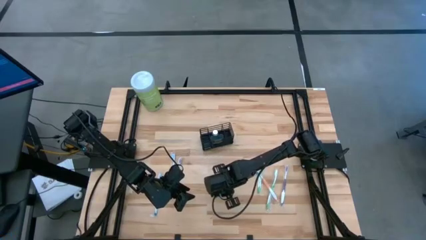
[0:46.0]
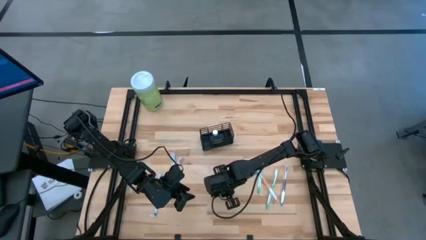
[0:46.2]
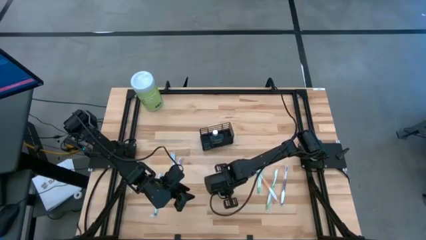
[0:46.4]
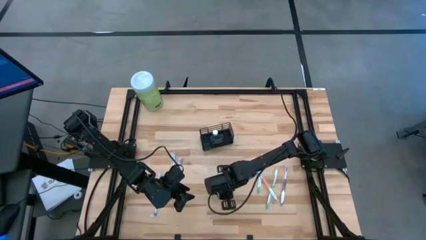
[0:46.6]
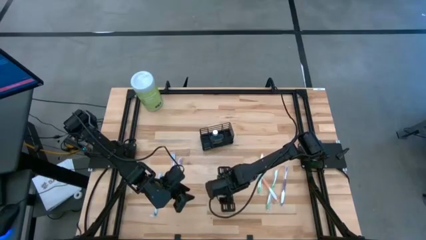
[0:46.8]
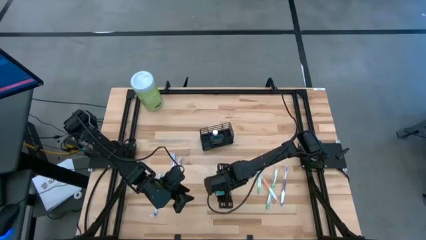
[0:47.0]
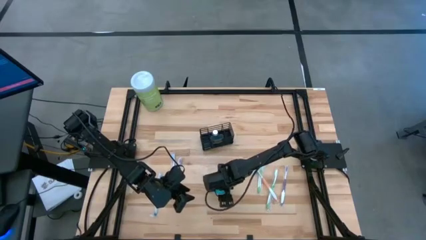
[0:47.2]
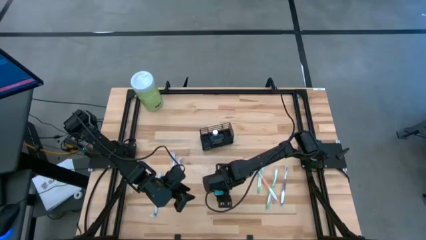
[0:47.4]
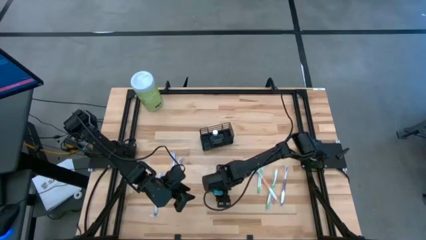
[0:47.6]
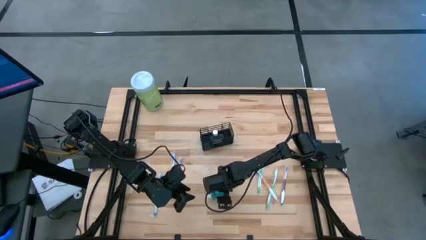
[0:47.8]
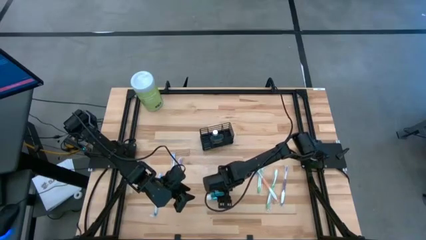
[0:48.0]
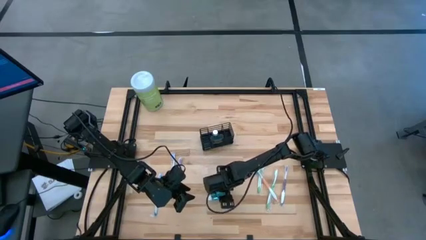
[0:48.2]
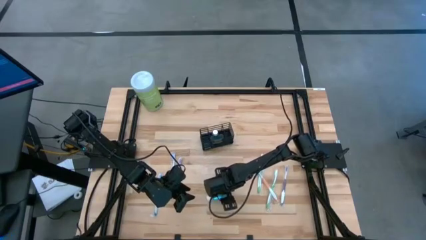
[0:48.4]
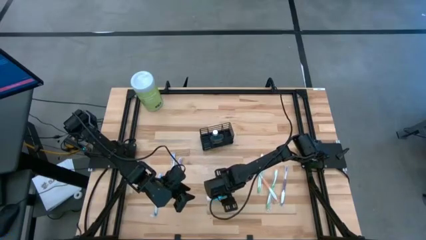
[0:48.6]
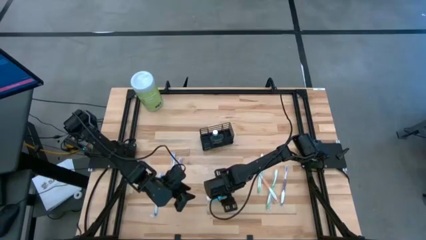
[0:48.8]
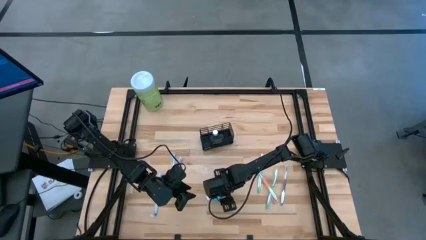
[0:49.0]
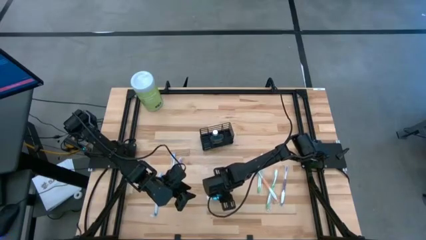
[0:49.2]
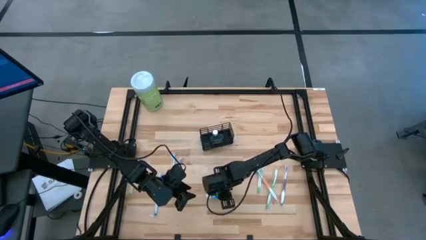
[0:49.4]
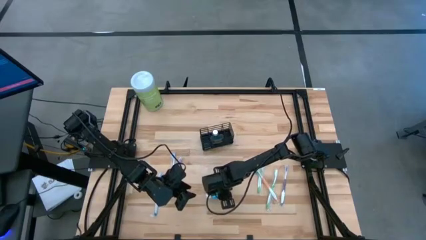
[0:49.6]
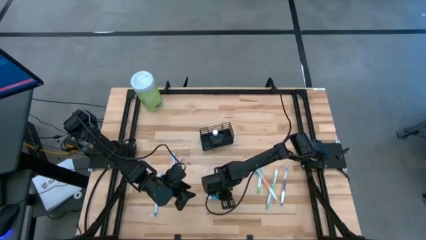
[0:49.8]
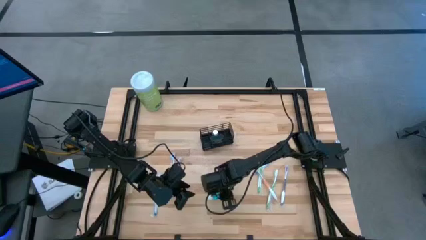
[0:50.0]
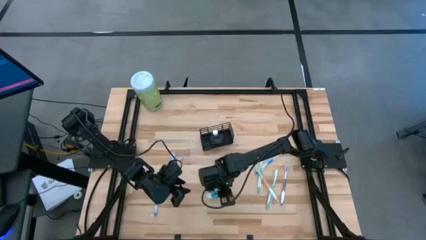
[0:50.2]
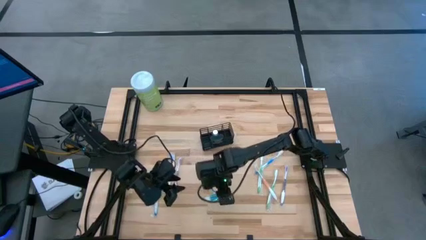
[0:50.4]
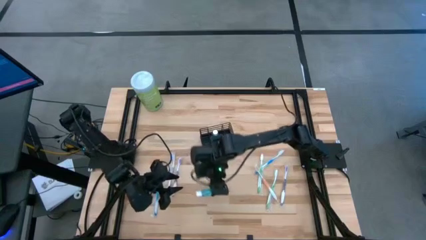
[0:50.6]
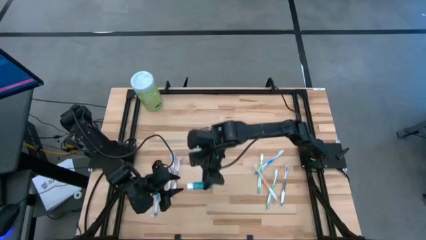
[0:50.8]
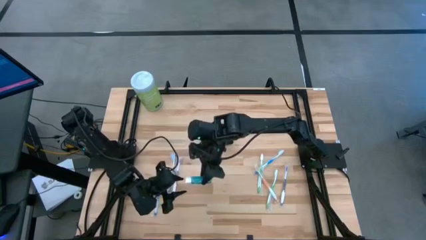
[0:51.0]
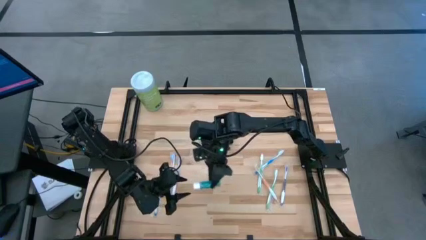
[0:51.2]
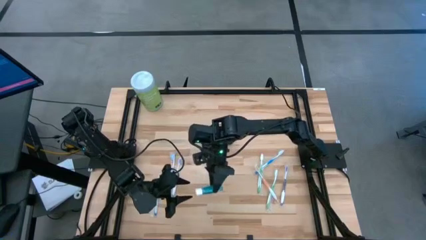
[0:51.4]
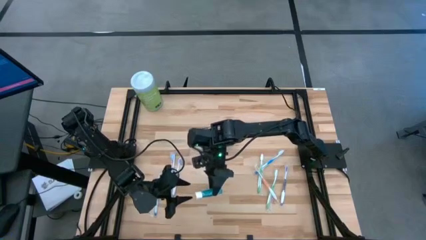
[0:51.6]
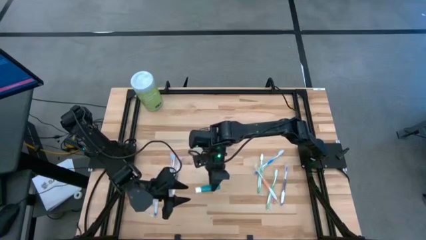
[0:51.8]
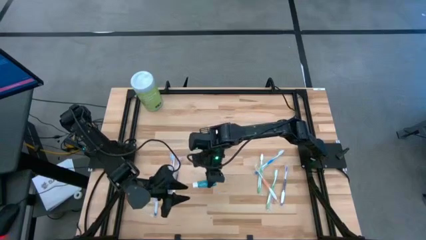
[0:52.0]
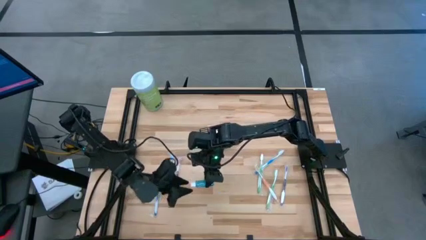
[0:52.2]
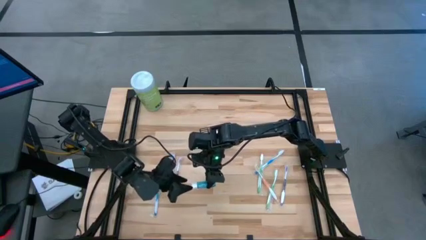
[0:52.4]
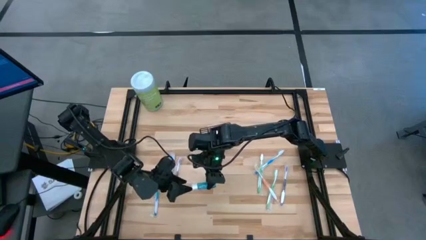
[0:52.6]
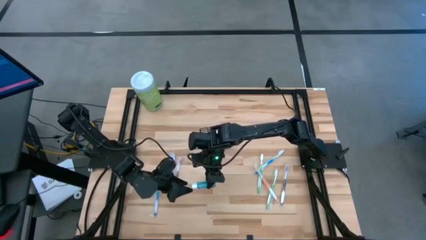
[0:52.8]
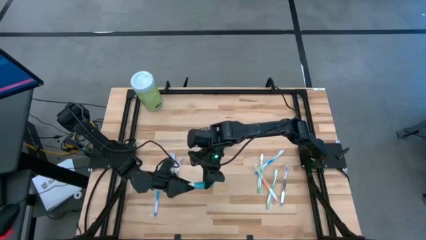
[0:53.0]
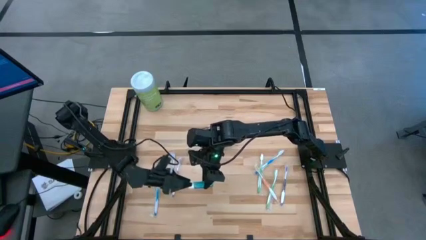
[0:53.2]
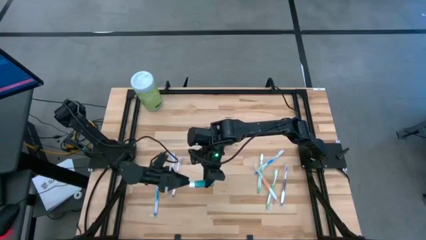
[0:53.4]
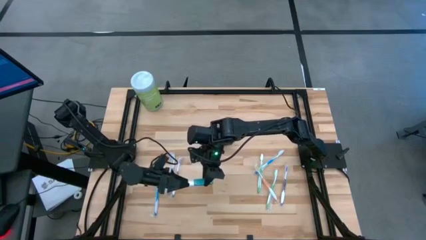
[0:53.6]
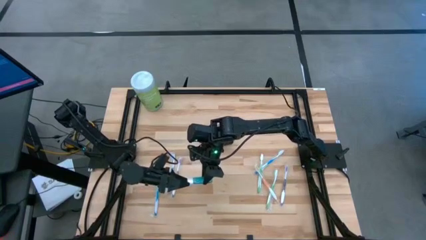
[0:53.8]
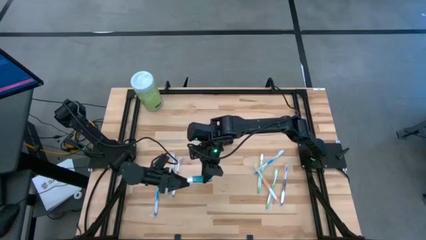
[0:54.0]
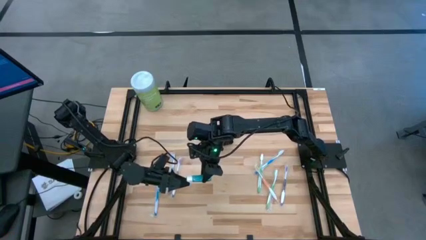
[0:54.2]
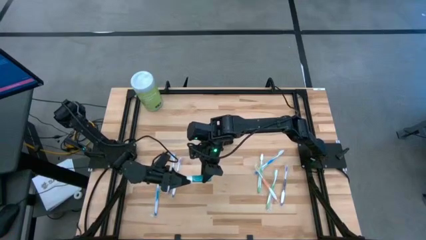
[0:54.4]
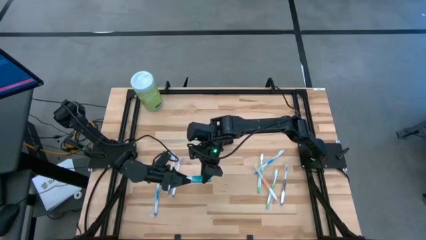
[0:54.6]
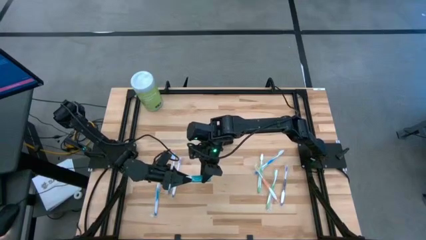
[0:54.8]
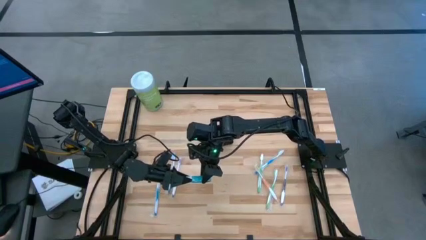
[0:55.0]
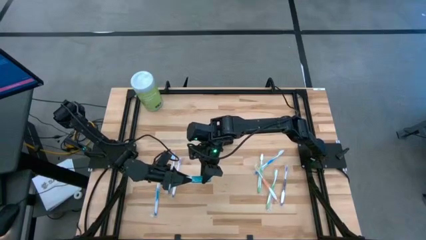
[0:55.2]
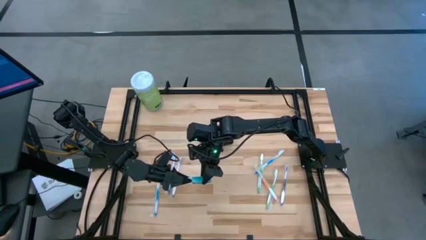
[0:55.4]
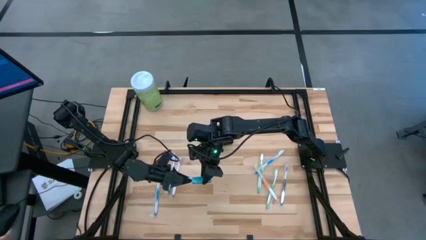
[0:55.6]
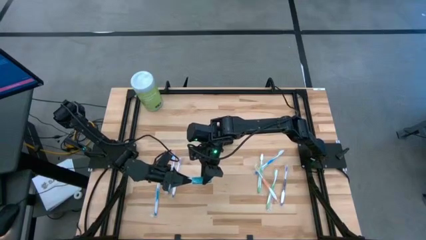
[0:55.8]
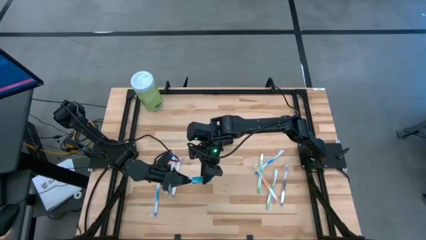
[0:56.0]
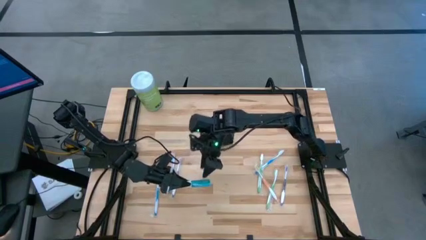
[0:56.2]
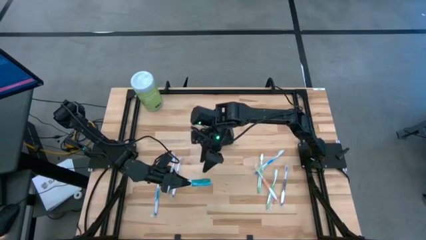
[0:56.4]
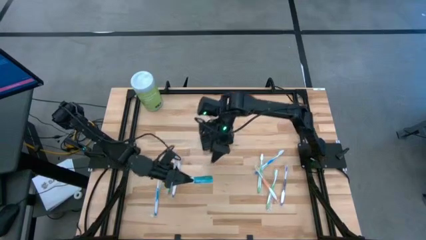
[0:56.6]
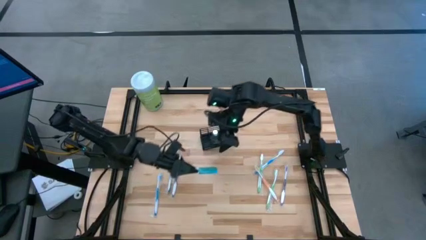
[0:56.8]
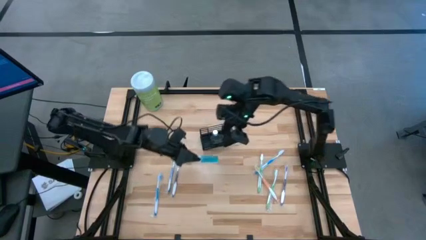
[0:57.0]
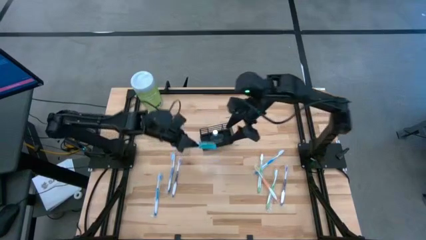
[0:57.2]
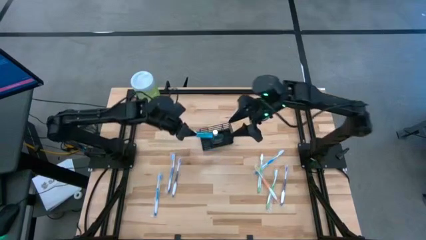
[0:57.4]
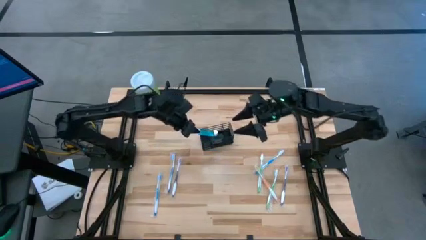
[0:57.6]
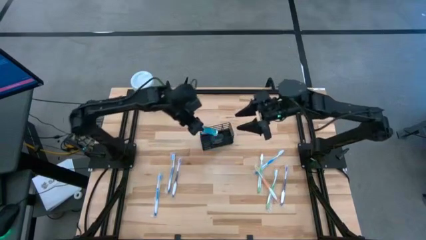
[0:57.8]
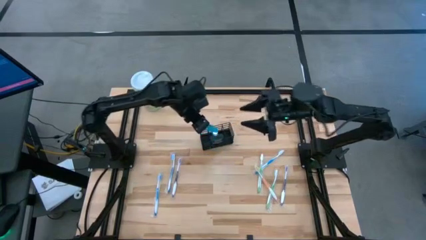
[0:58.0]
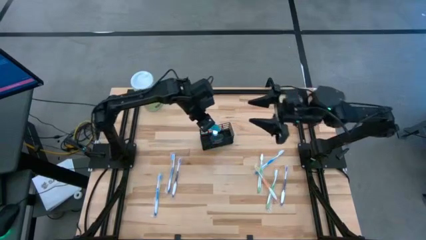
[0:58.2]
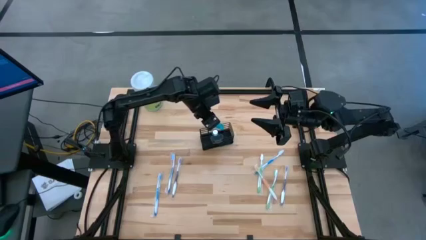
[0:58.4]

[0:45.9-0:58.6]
Task: Pick & Place toothbrushing station
Put the blue mouthwash into the black mesh organizer

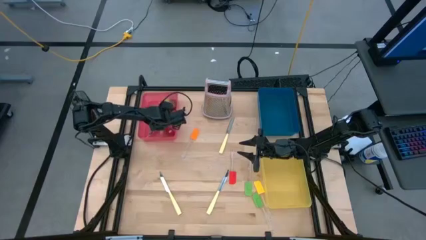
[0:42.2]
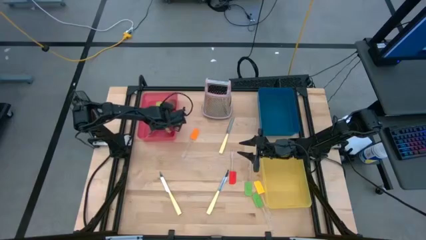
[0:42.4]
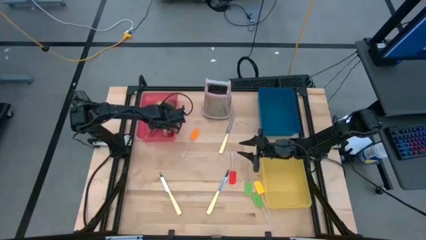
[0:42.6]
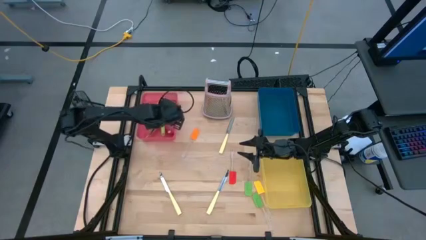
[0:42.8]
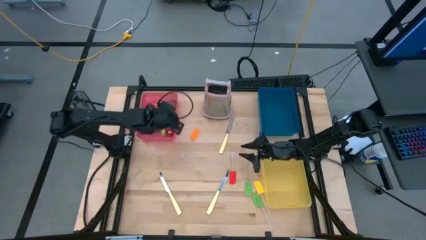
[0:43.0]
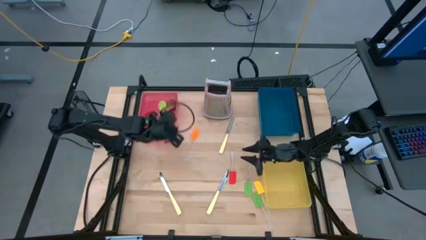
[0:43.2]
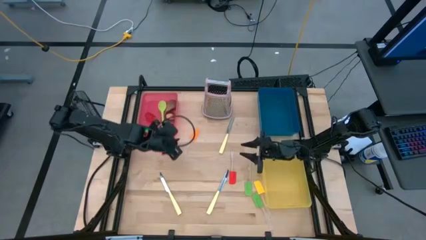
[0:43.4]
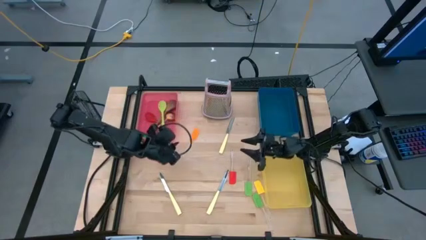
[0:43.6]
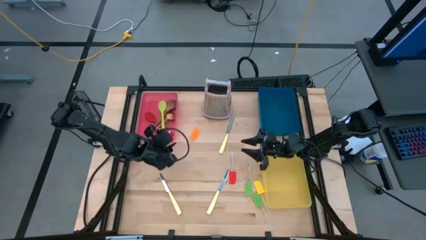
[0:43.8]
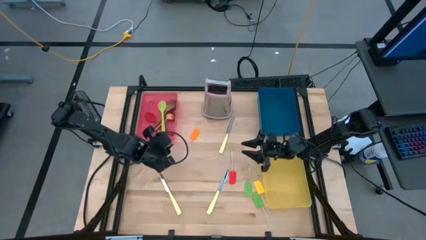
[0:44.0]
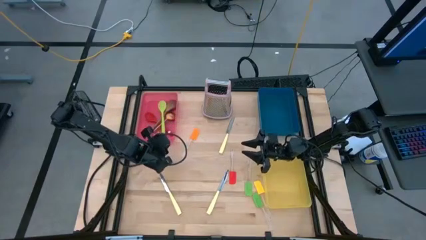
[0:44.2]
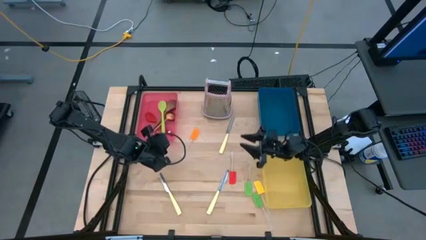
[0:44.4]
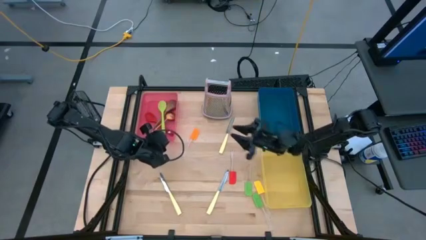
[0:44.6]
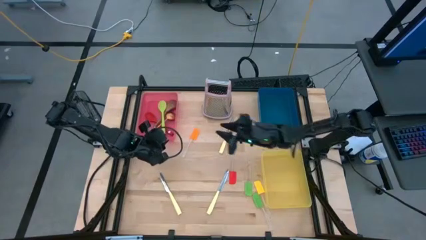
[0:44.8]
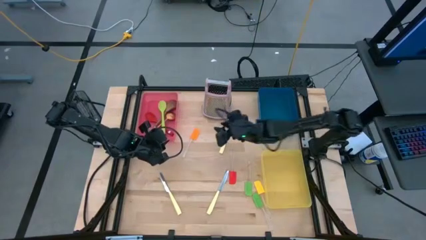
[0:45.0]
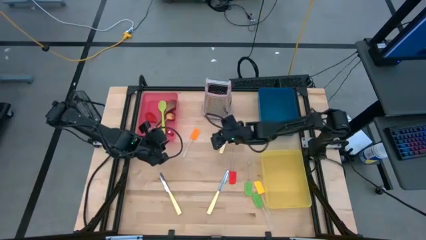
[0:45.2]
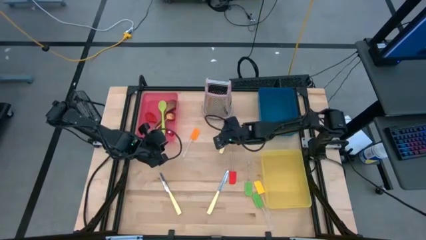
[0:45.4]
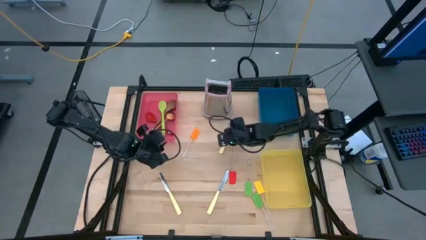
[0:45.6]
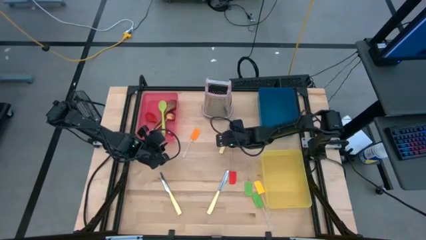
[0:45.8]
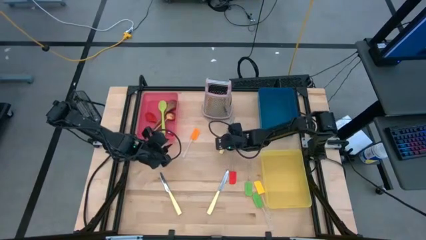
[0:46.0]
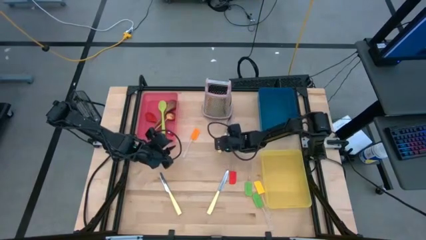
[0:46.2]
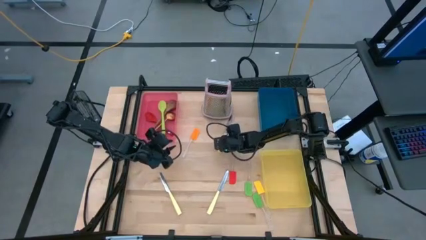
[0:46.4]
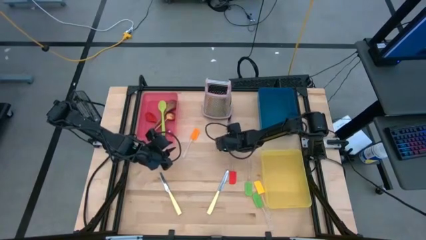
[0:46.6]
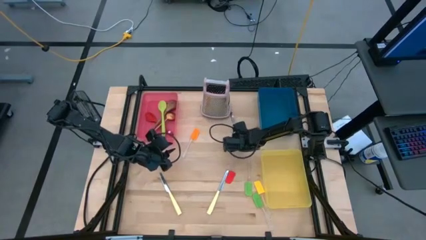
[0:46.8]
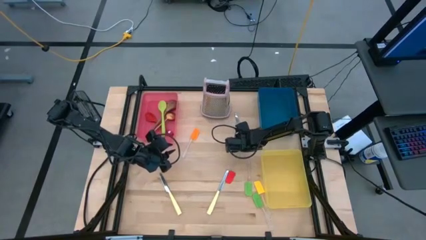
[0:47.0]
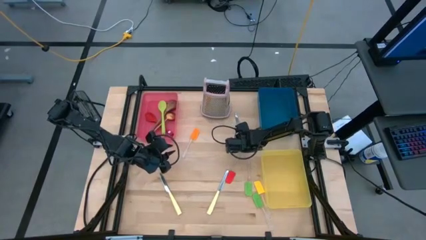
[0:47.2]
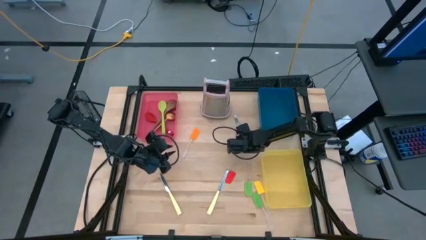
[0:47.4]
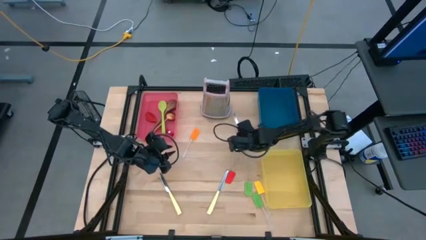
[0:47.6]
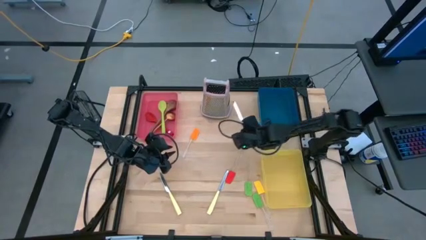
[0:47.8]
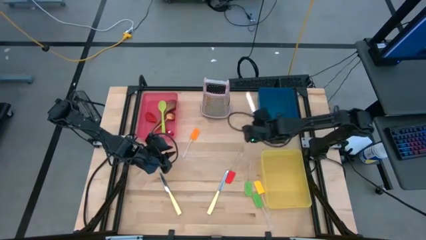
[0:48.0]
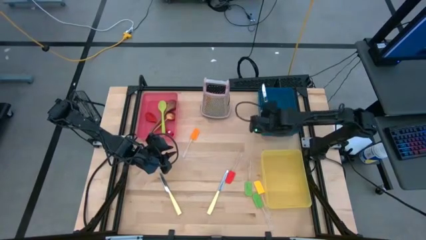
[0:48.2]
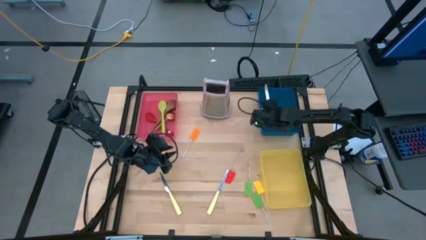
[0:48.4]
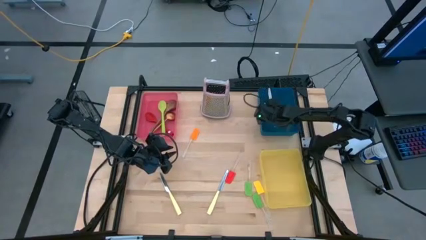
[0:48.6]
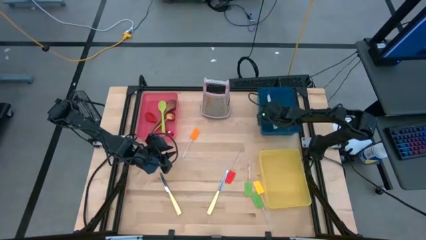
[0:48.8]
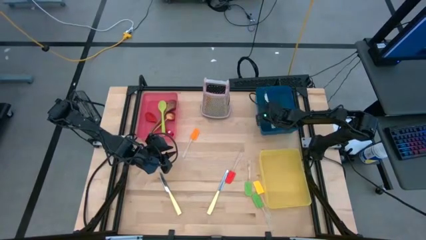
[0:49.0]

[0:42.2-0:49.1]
Task: Pick & Place Kitchen Items
Put the top right yellow knife into the blue bin
